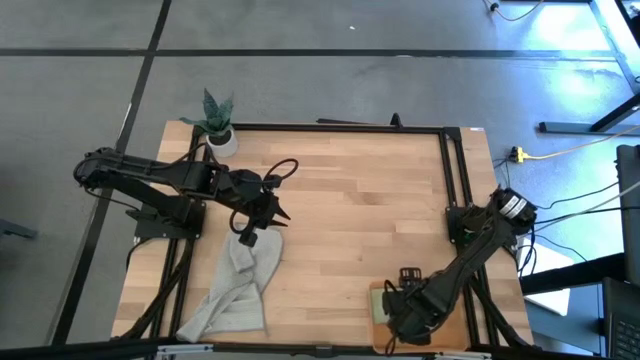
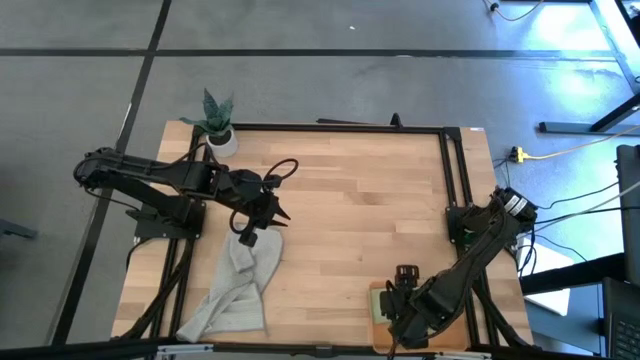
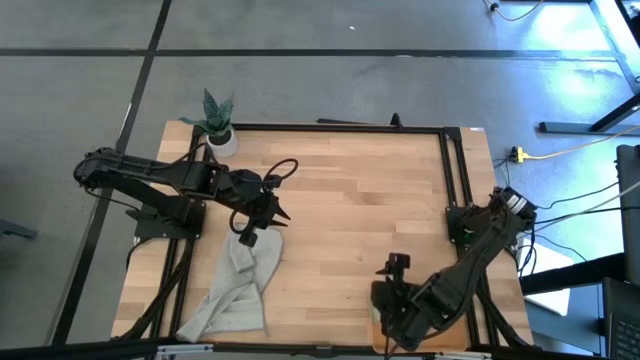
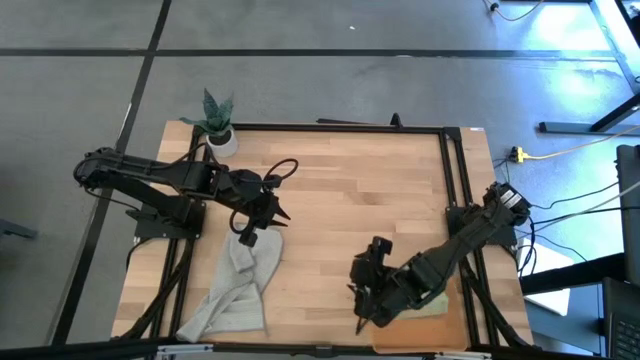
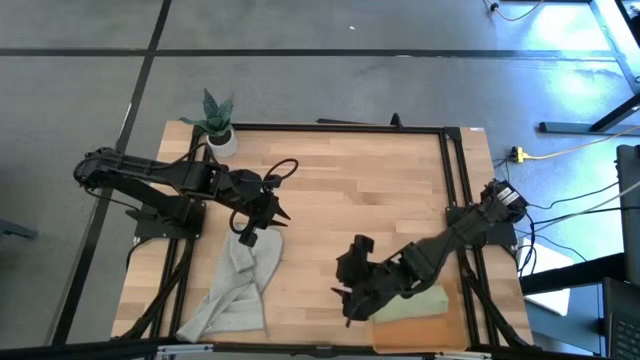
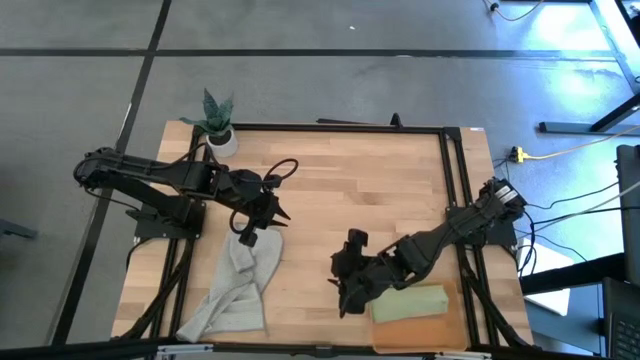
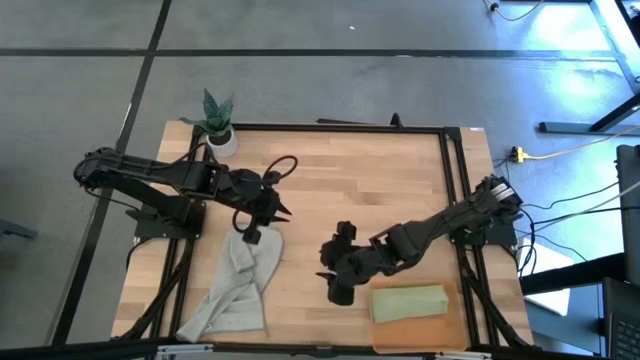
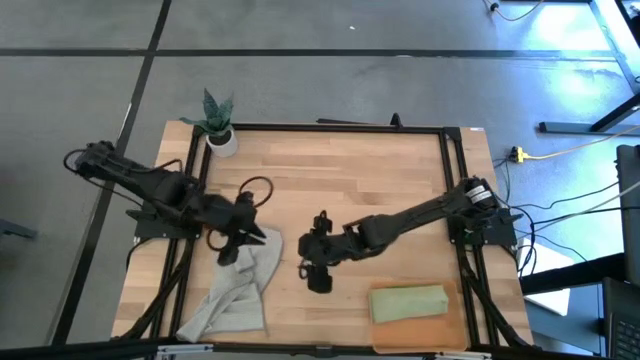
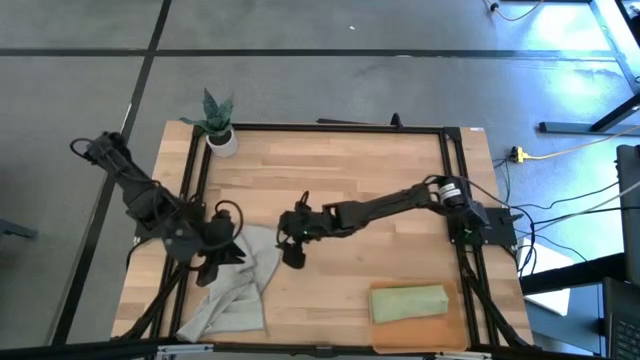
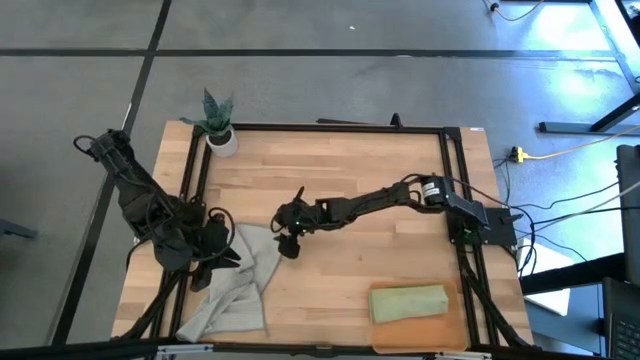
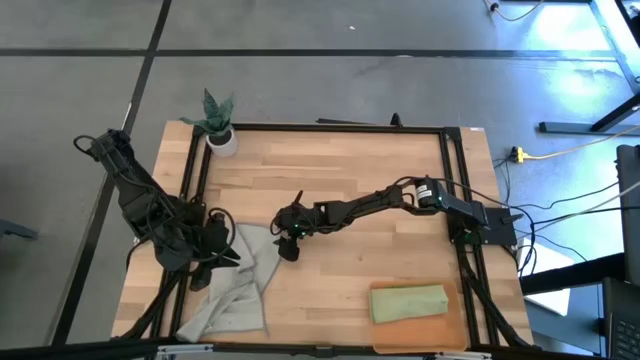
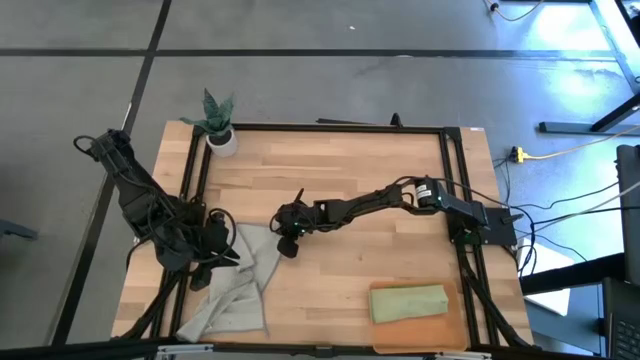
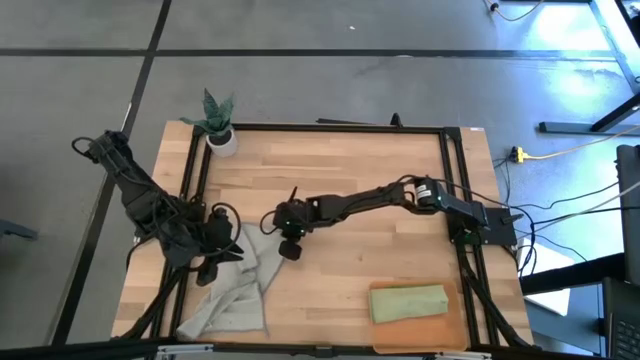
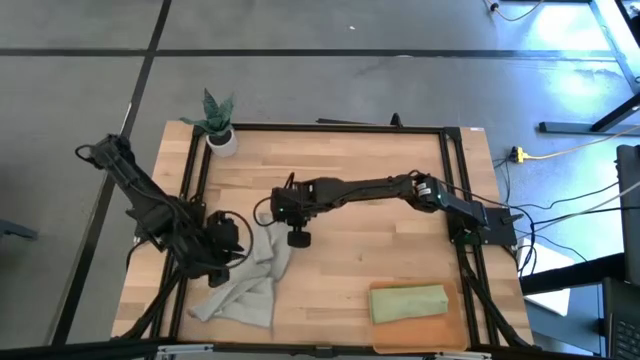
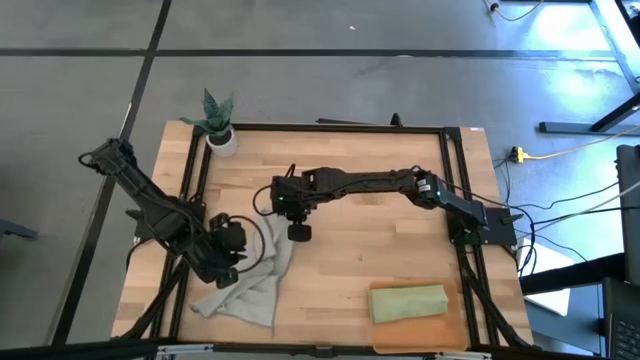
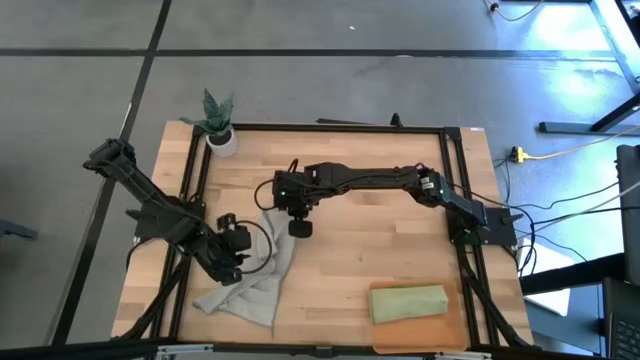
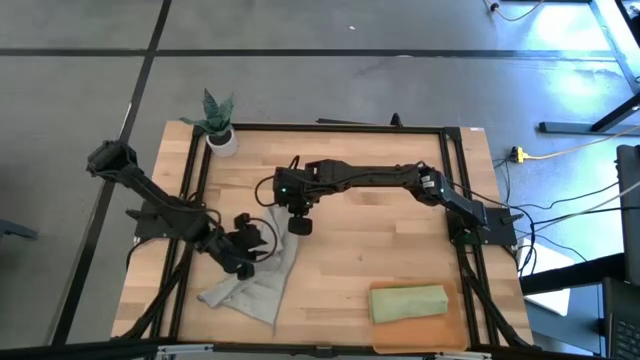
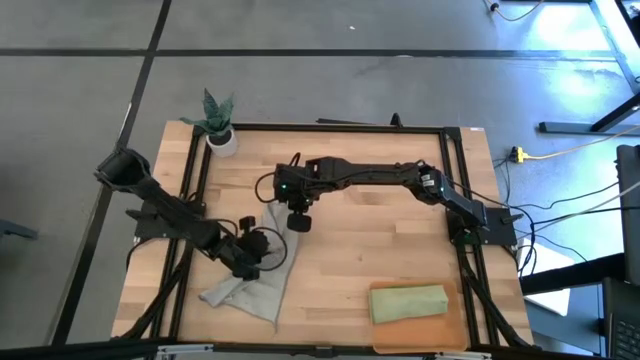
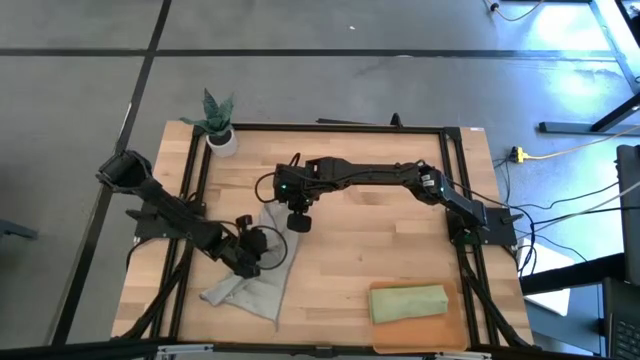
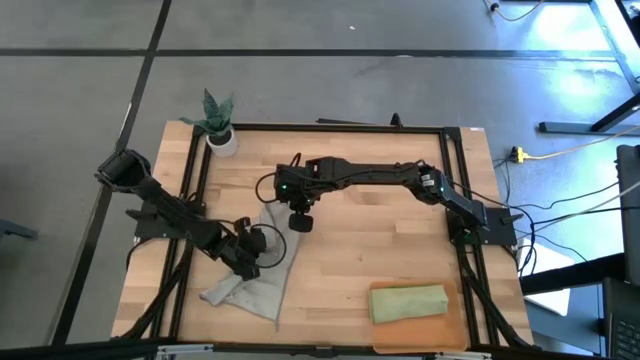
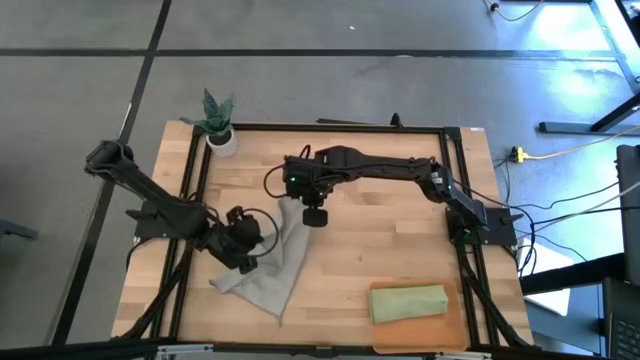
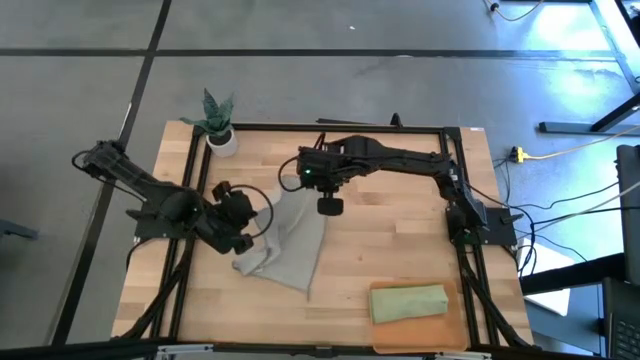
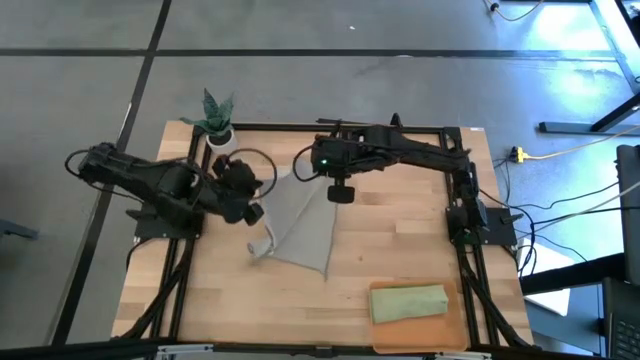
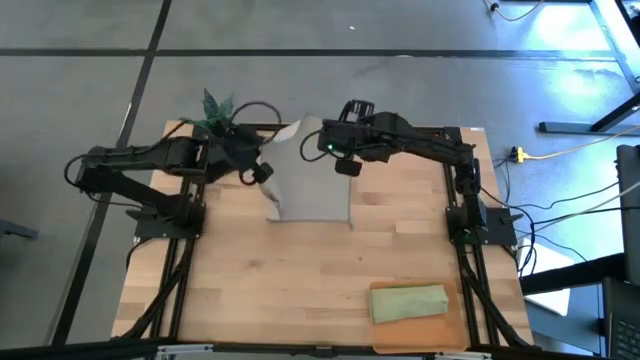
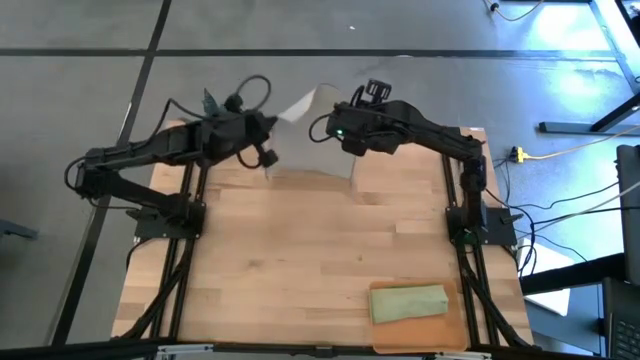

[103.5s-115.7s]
Task: Roll microfiber towels into tight, uniform cylinder then place into a basket
Fold the gray microfiber cloth

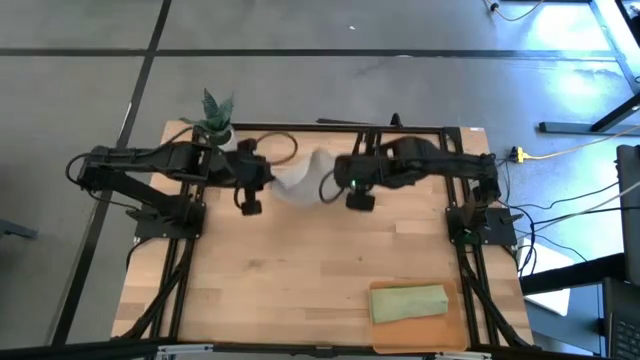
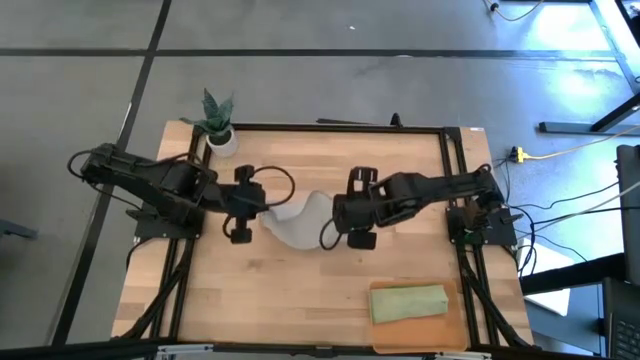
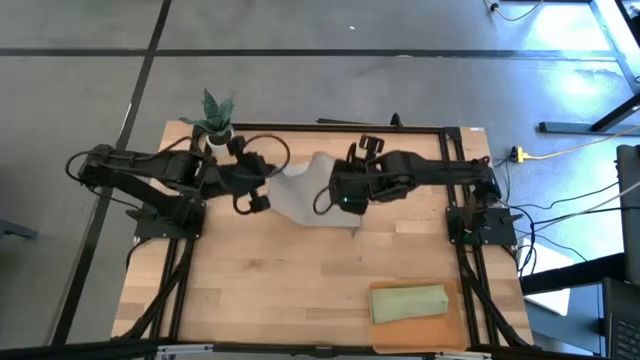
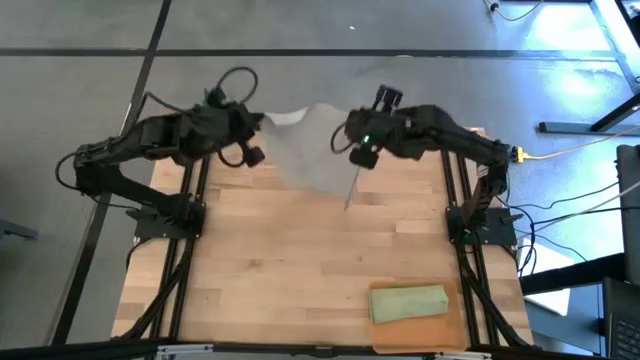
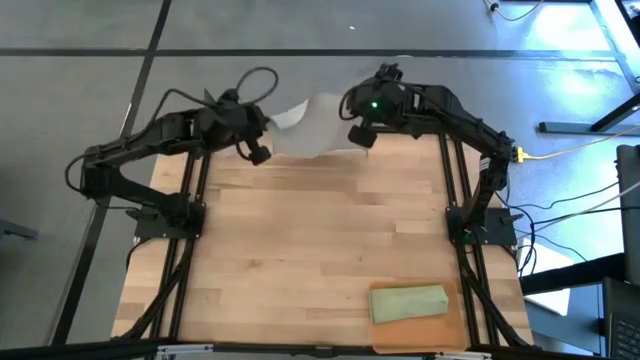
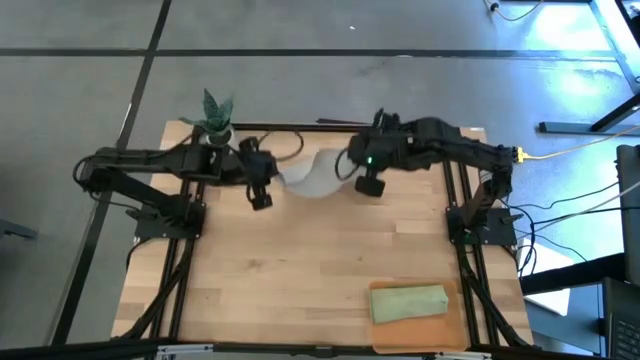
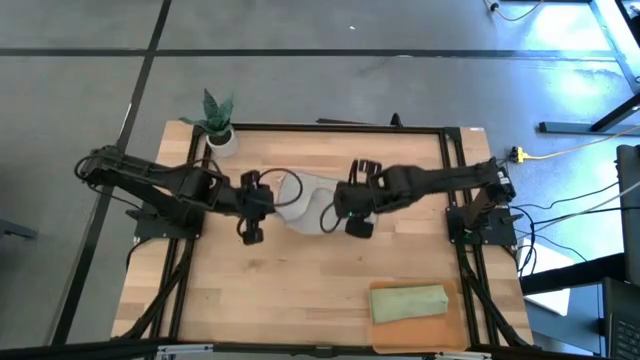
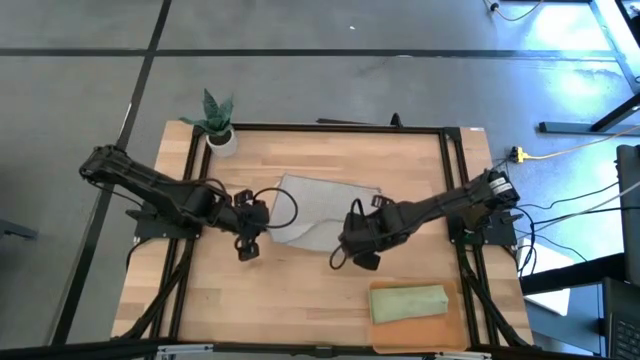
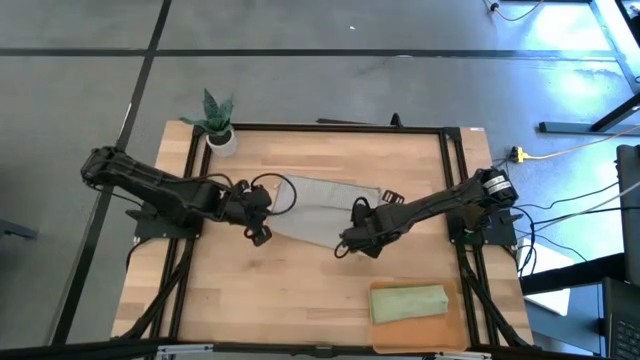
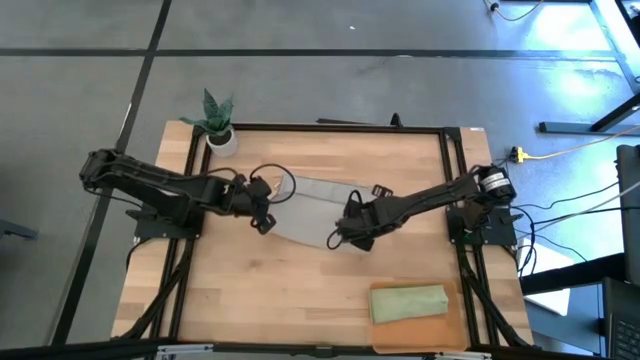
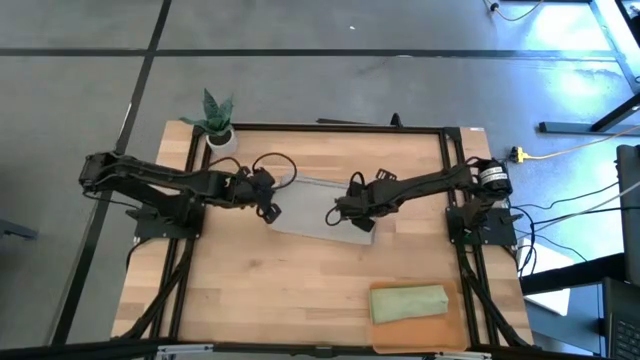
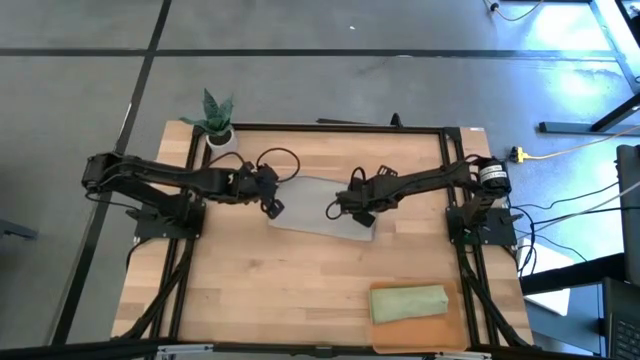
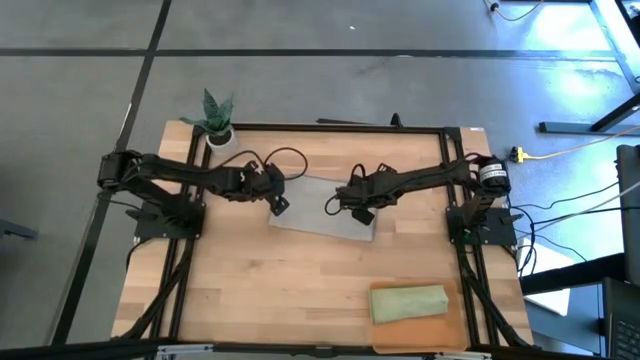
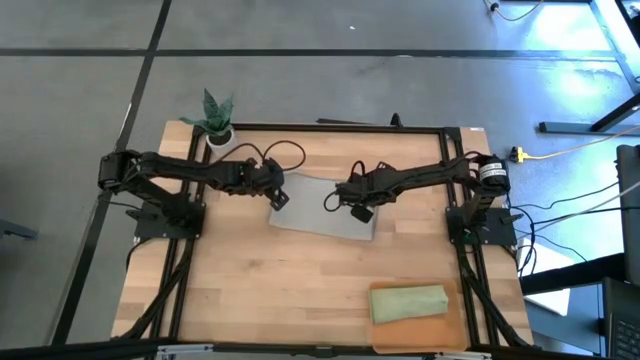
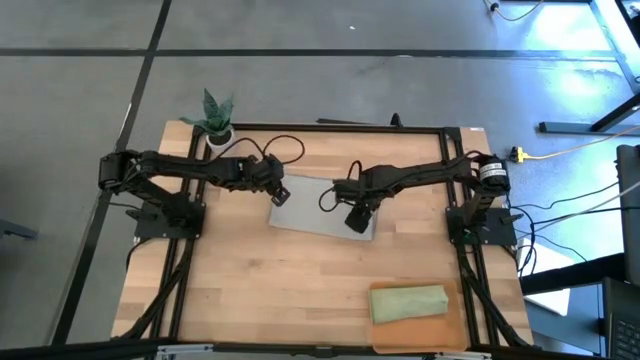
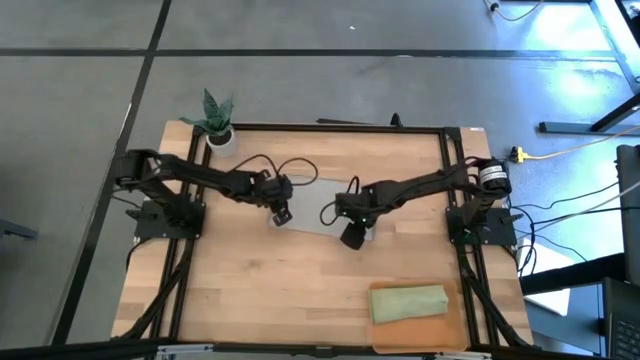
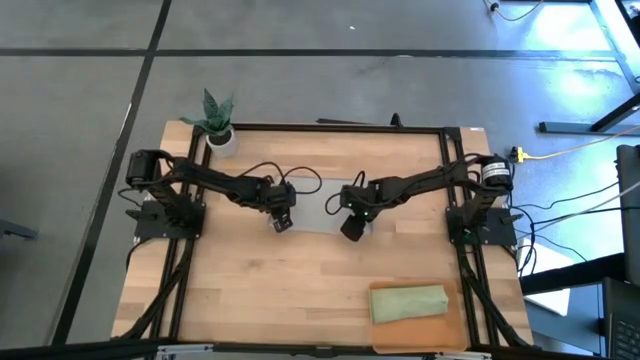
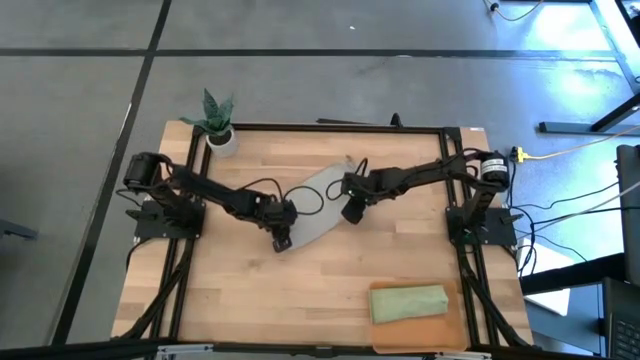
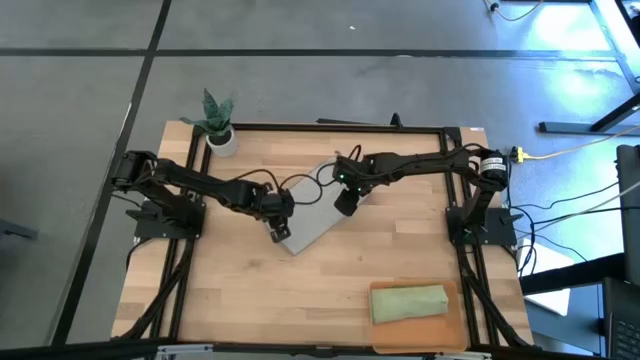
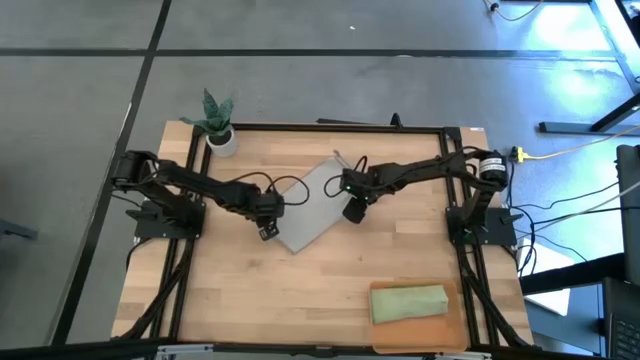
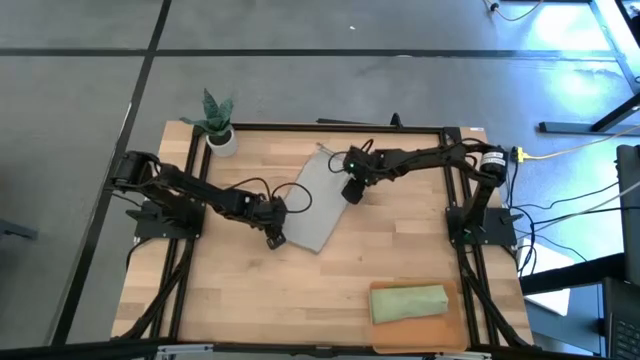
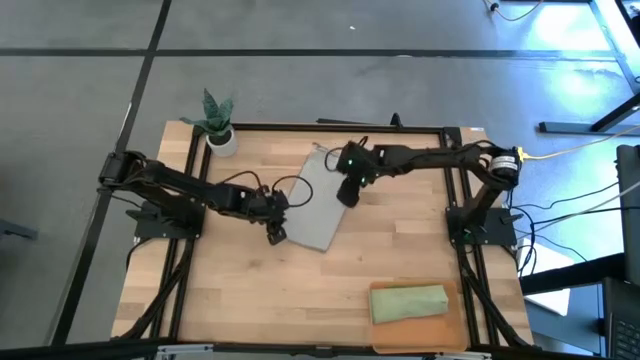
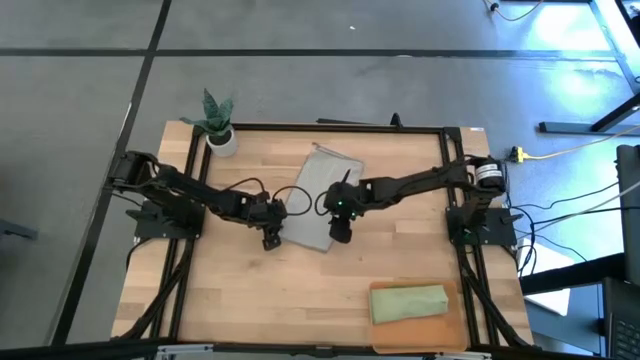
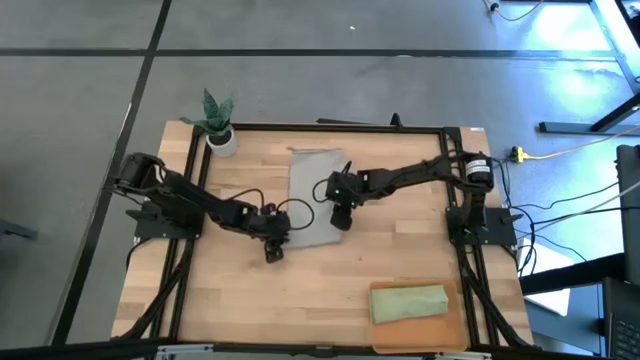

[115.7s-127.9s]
Fold the gray microfiber cloth
